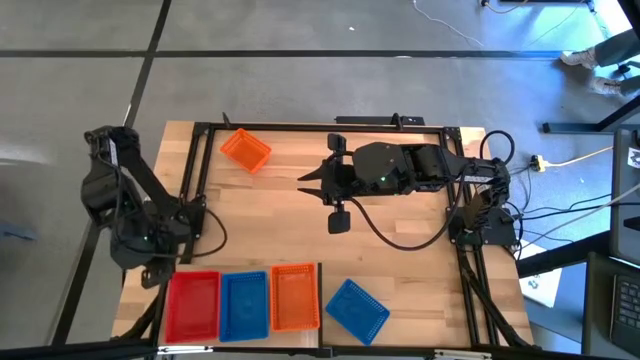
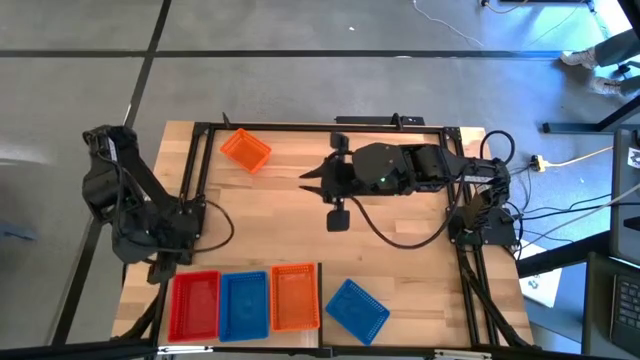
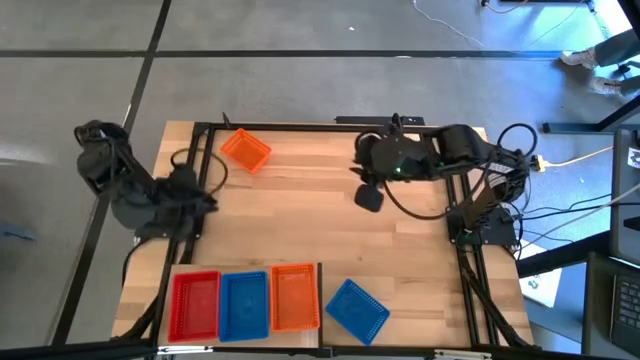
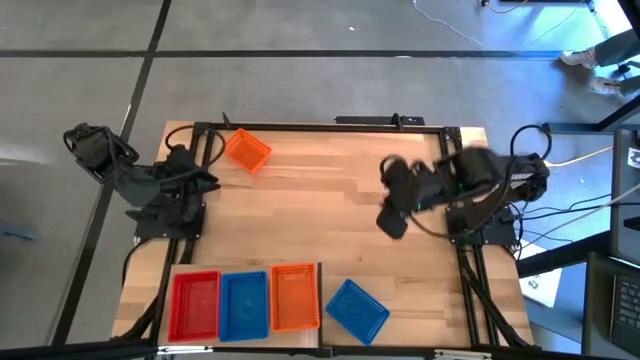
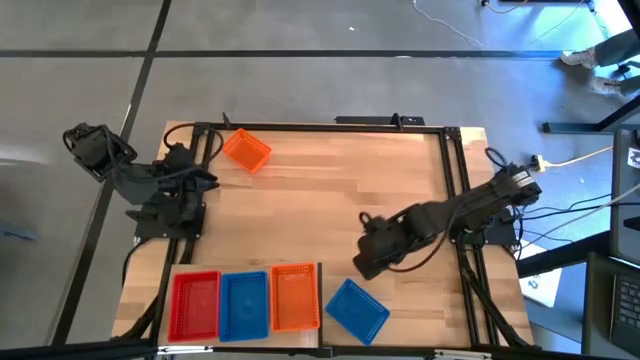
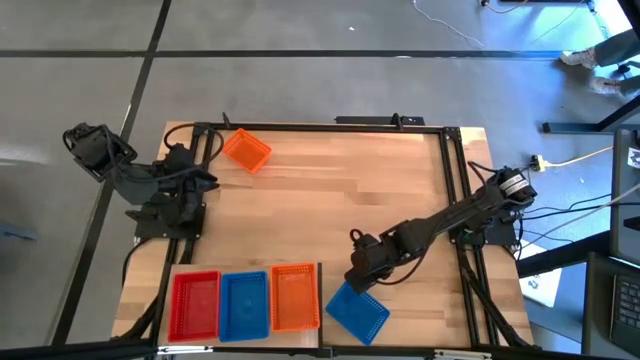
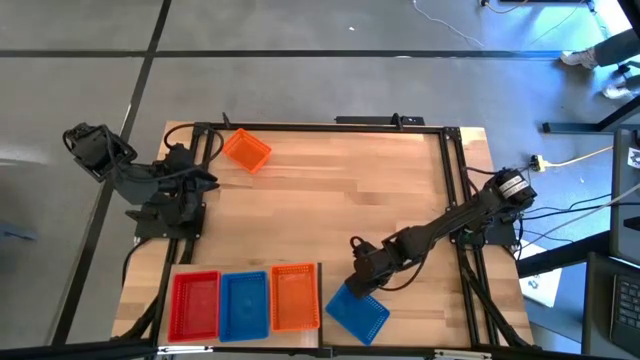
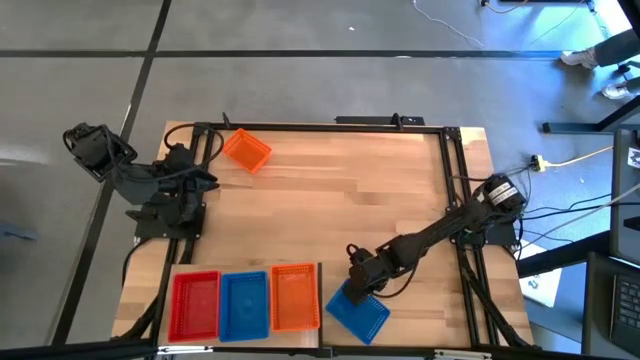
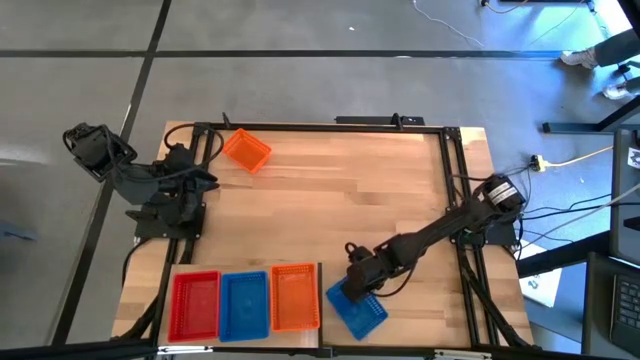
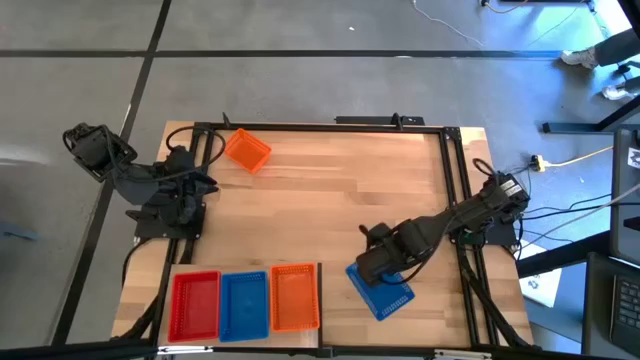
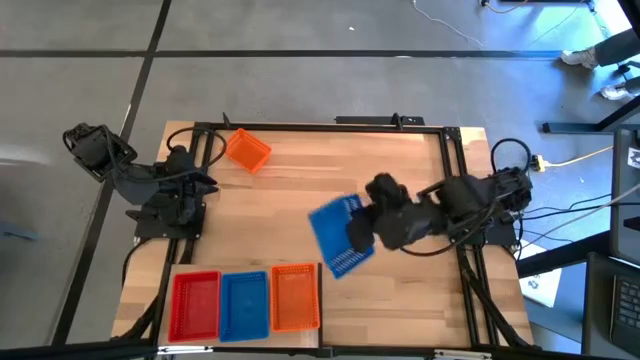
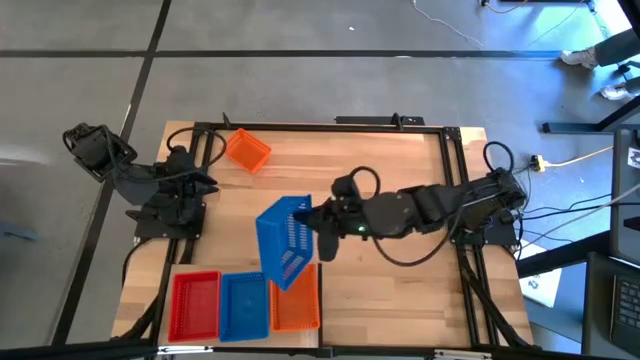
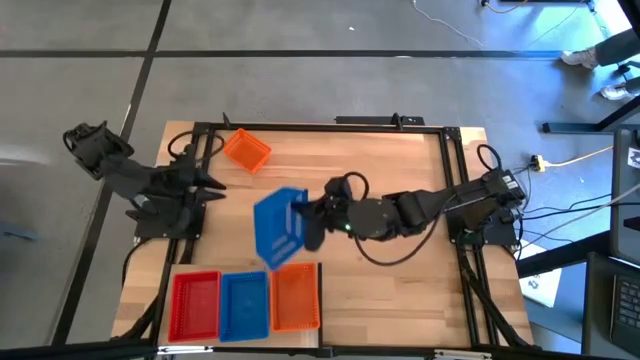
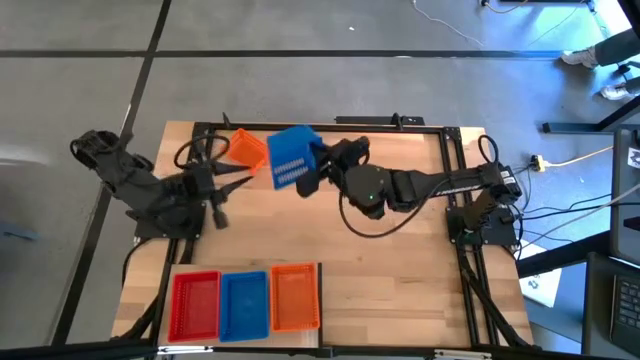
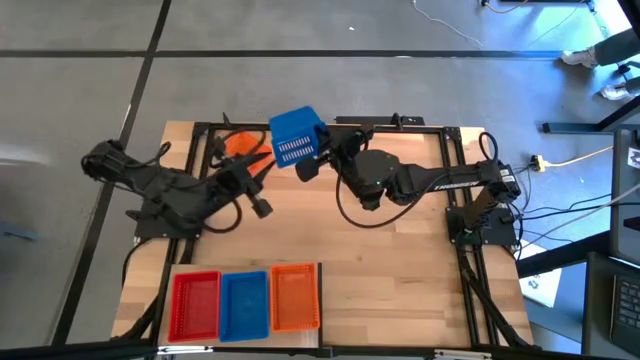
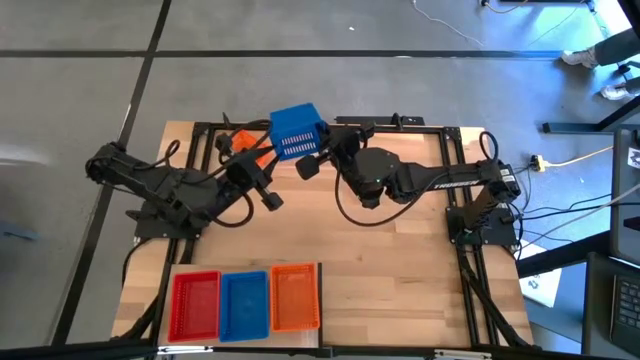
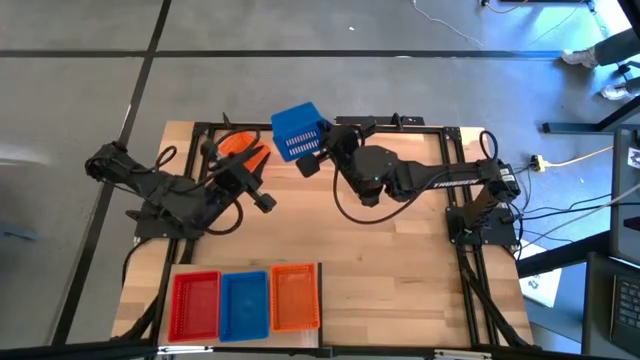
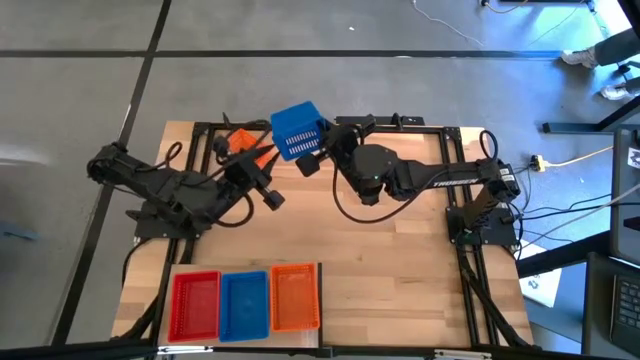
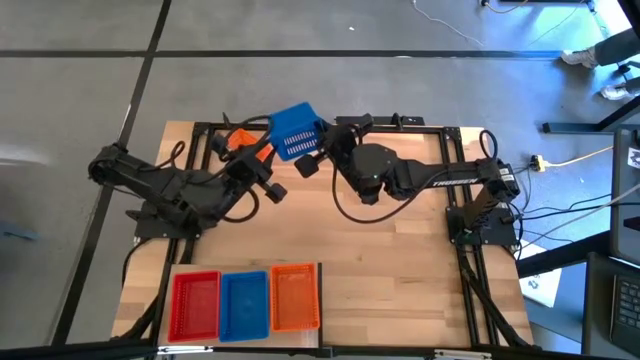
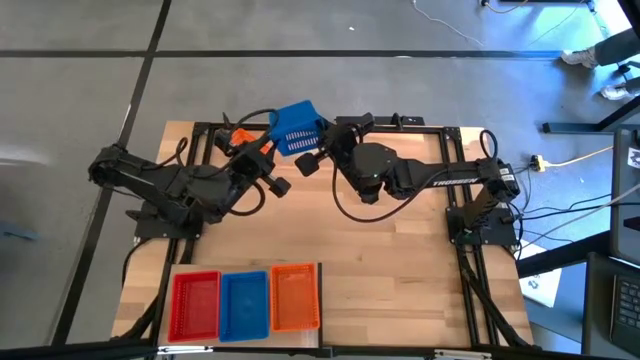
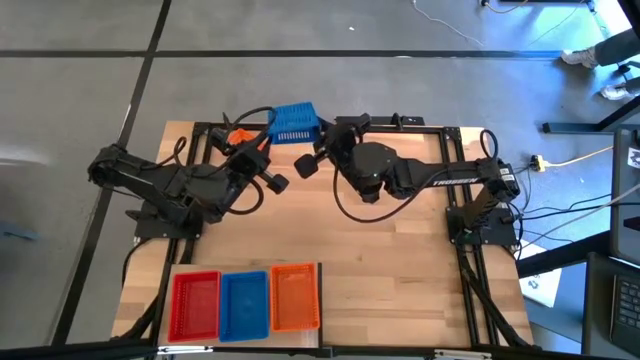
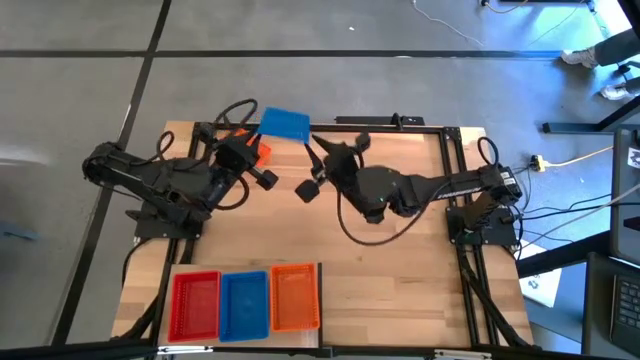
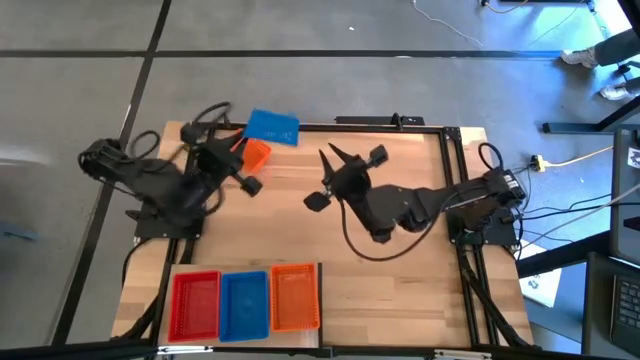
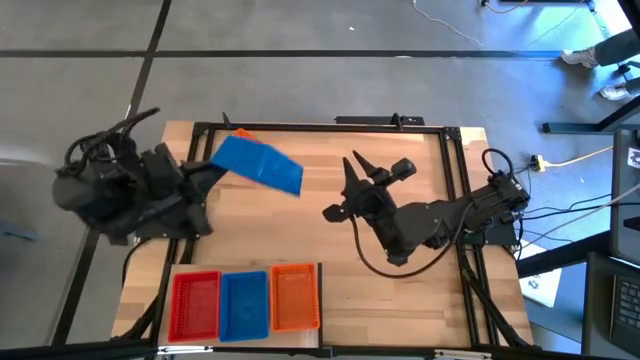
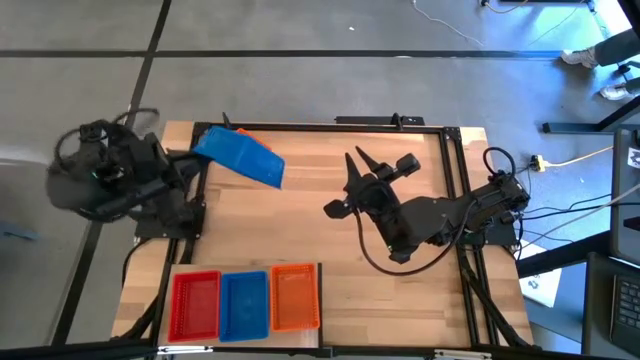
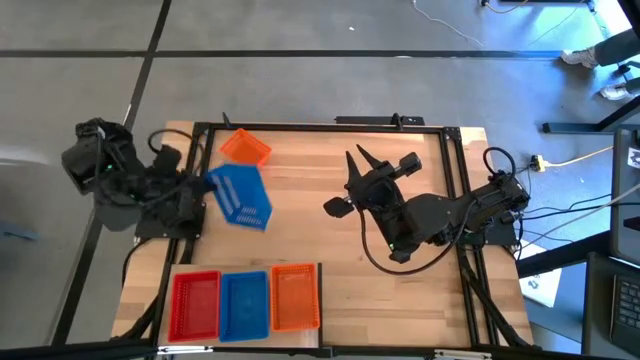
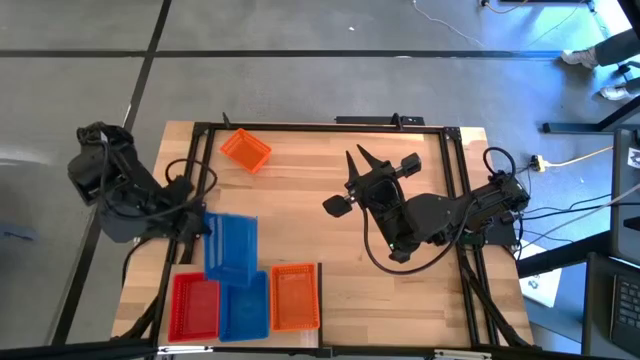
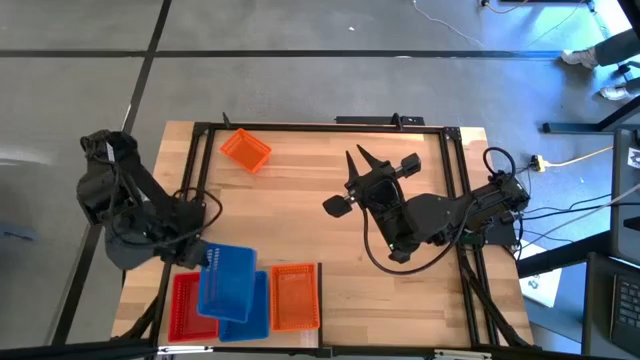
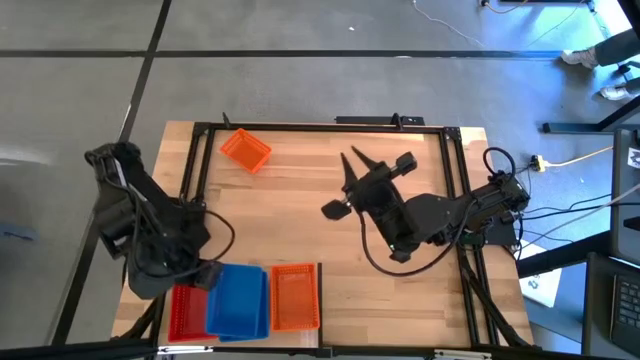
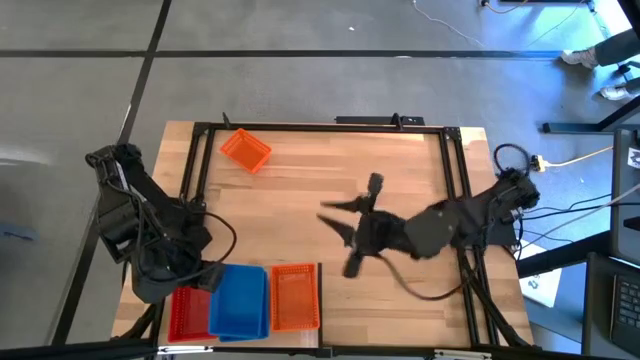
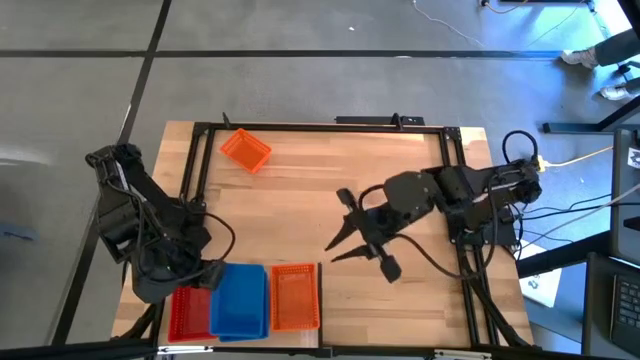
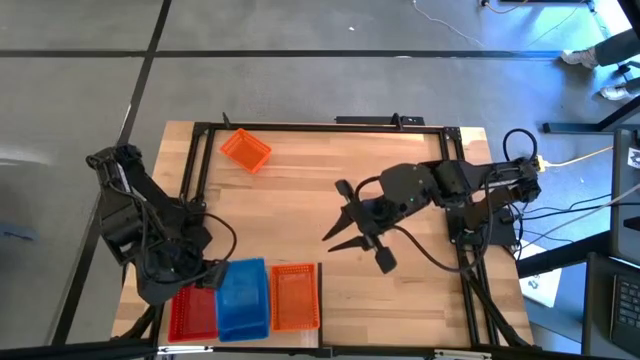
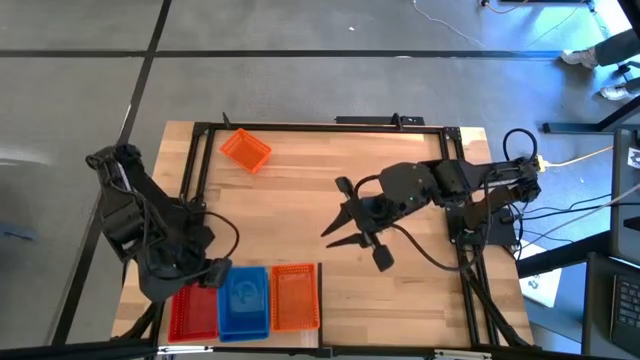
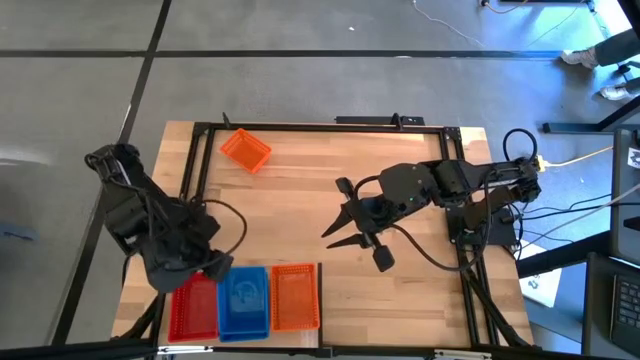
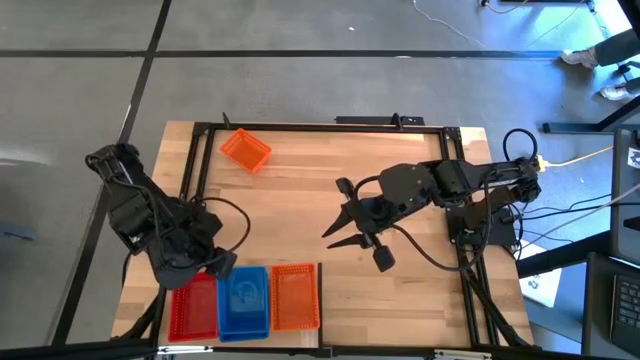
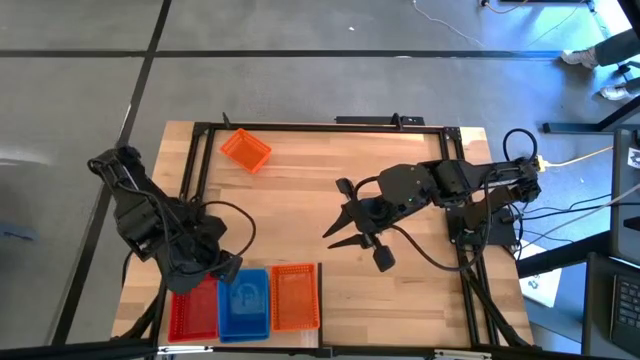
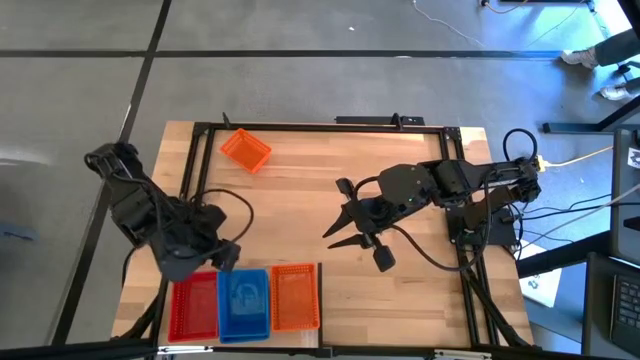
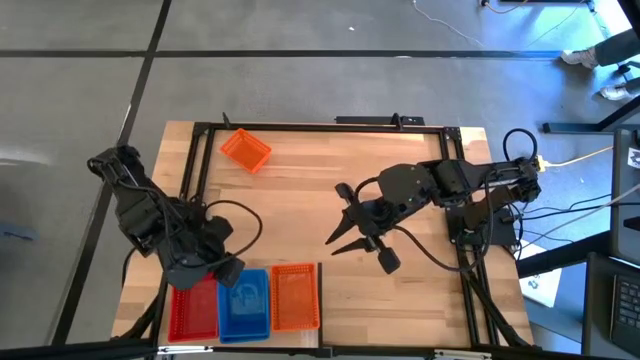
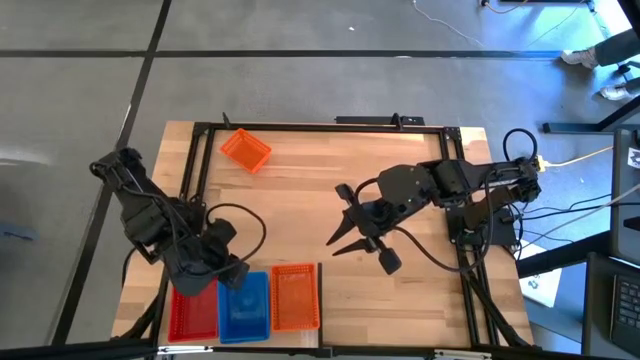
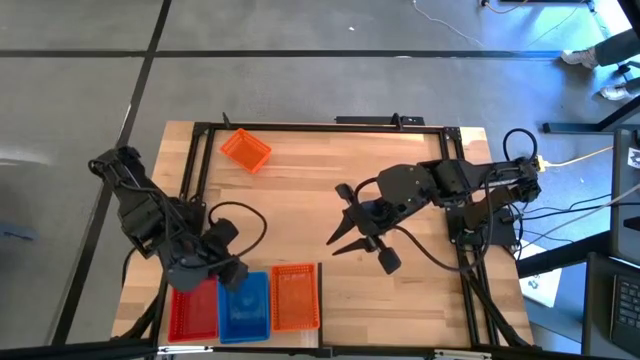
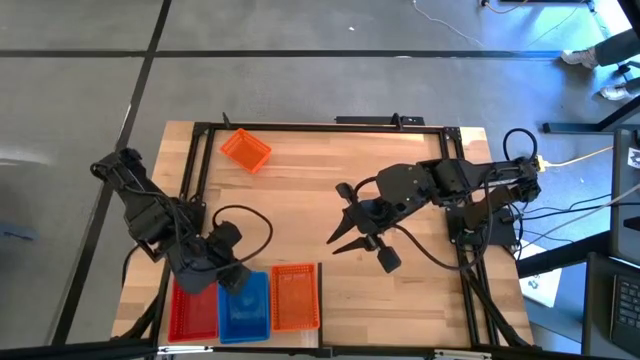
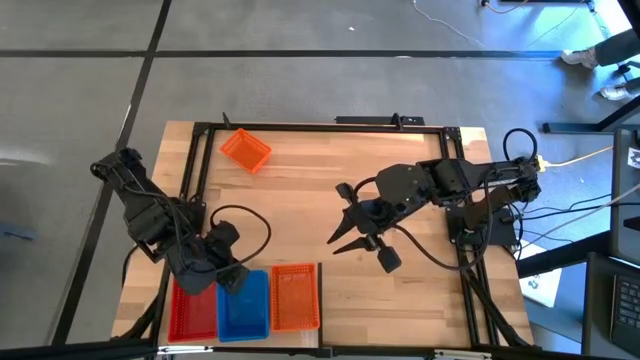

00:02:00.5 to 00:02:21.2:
Task: Stack baskets on shelf by color
Stack the blue bin on top of the other blue bin on the shelf

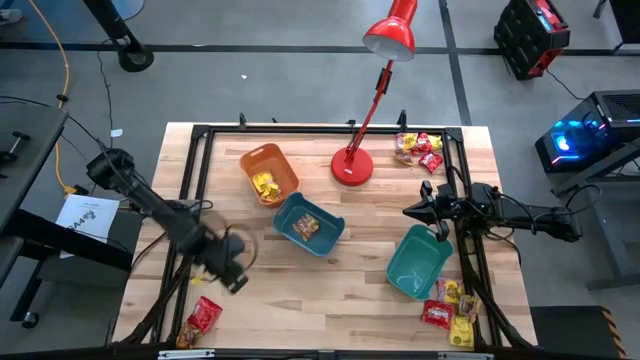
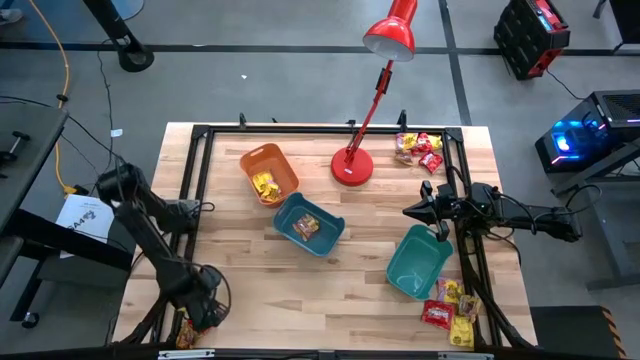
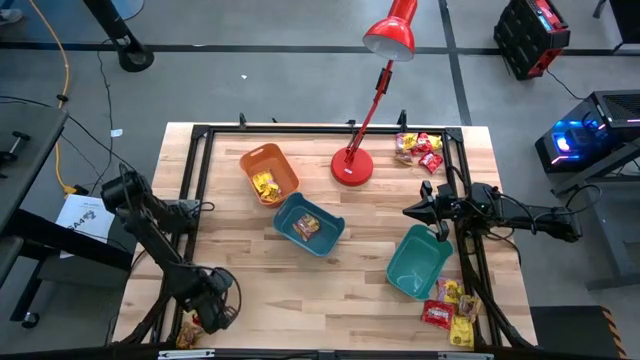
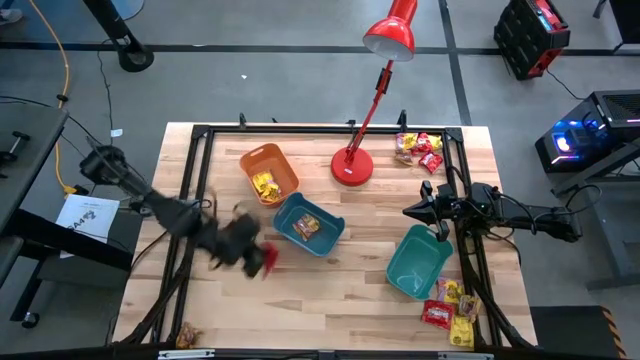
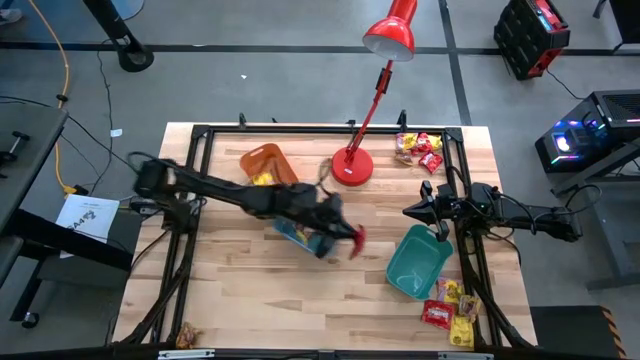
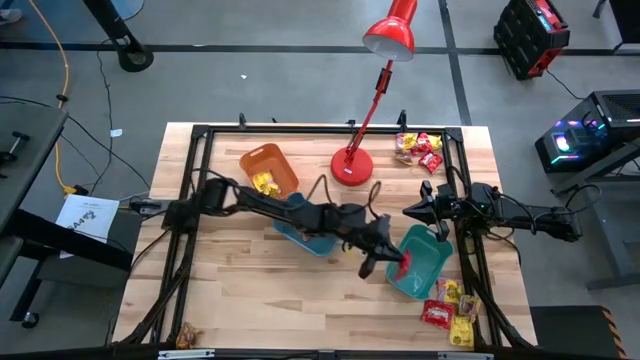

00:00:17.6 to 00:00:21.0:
Task: Sort candy
Put the bottom left red candy into the light blue bin
